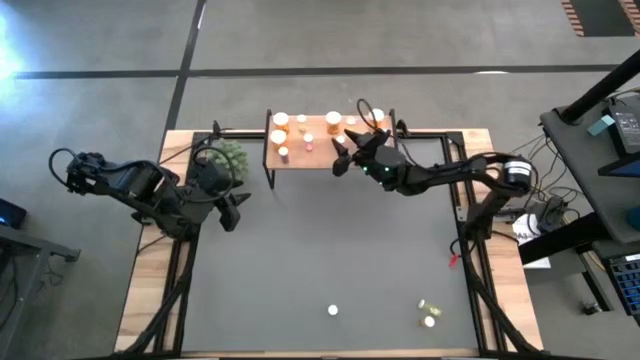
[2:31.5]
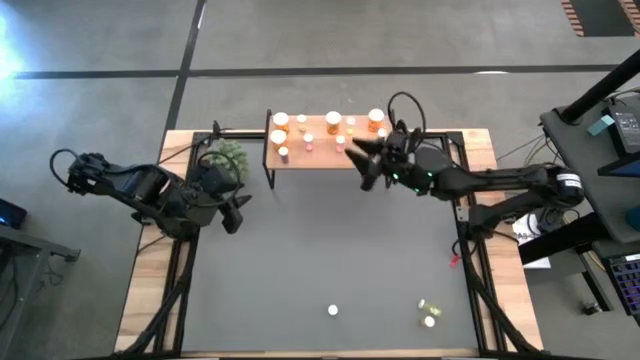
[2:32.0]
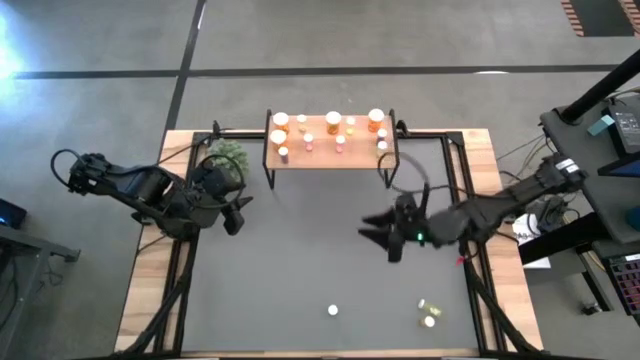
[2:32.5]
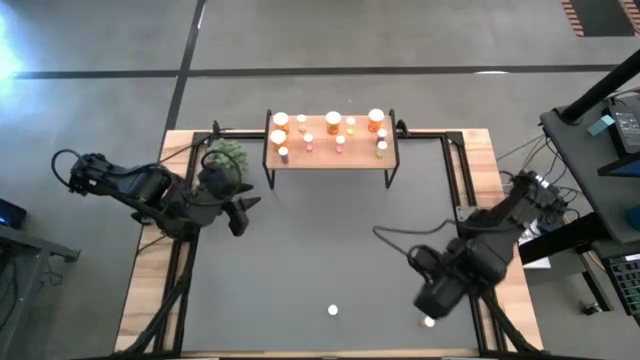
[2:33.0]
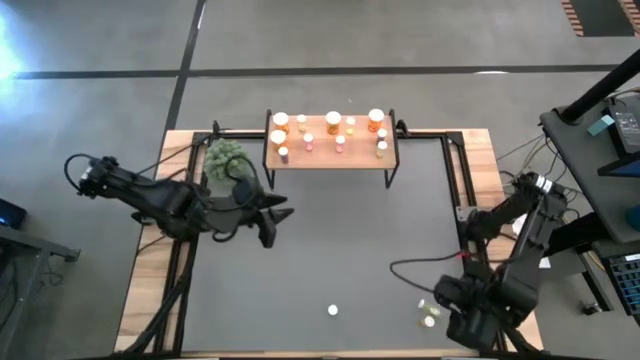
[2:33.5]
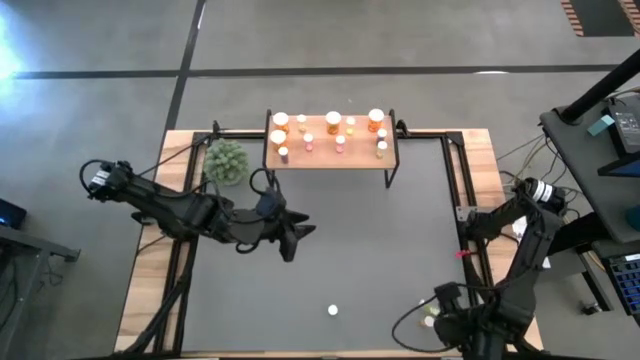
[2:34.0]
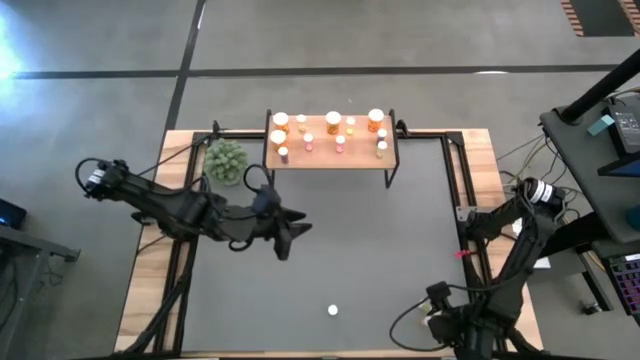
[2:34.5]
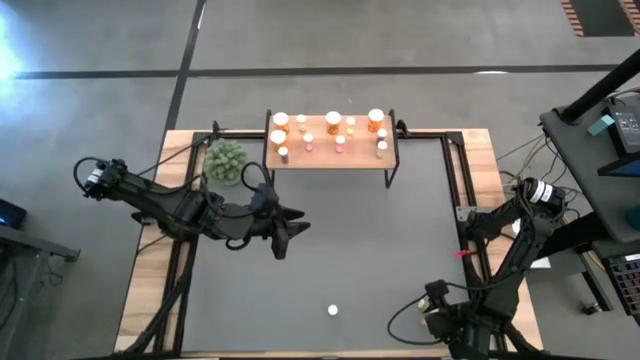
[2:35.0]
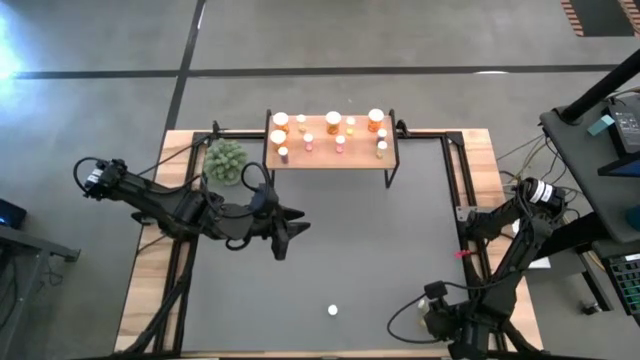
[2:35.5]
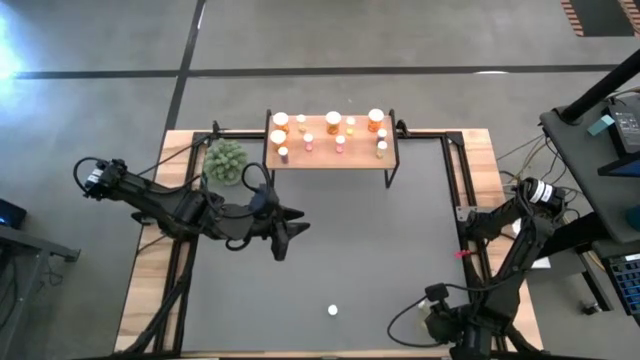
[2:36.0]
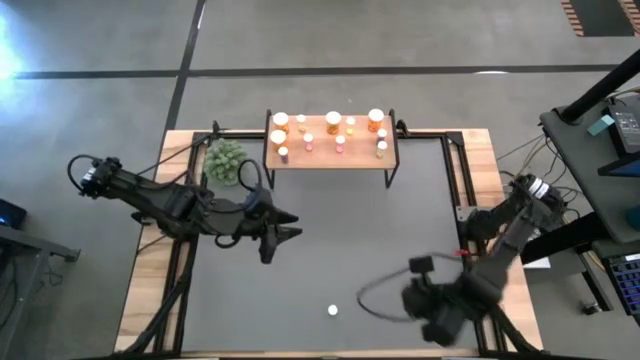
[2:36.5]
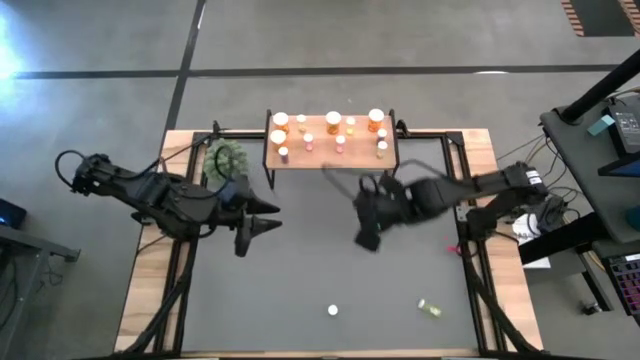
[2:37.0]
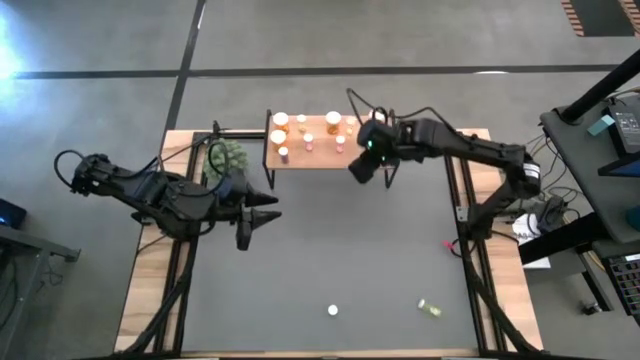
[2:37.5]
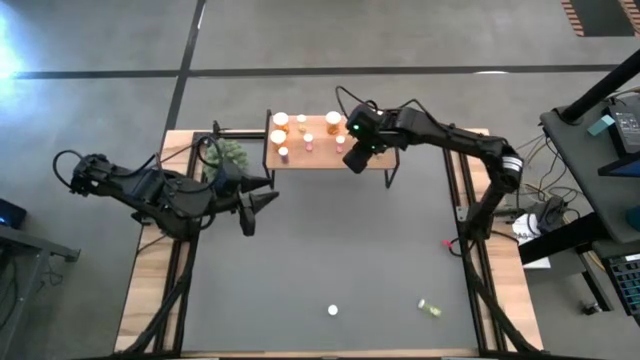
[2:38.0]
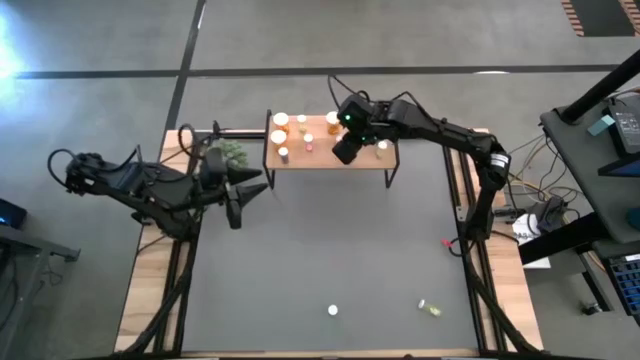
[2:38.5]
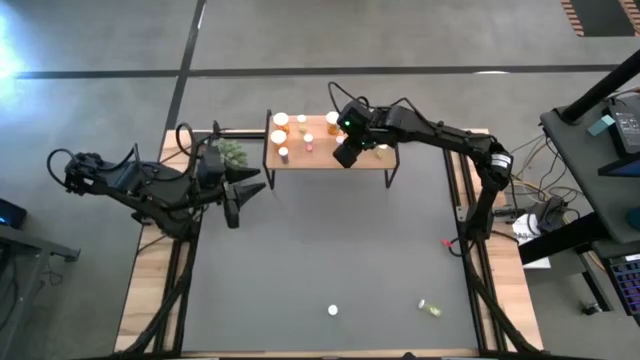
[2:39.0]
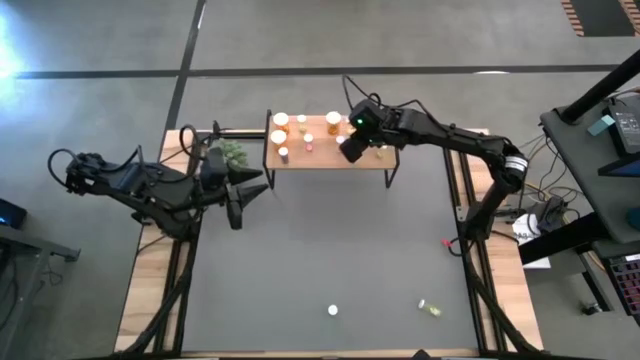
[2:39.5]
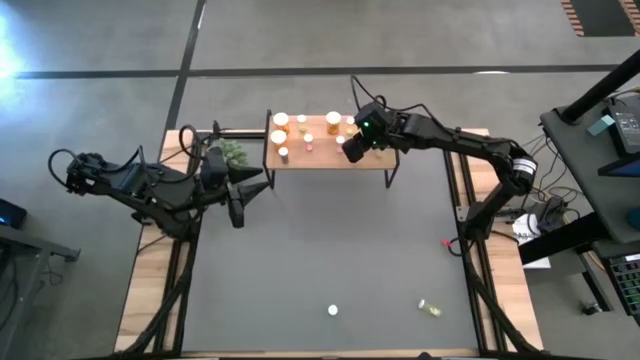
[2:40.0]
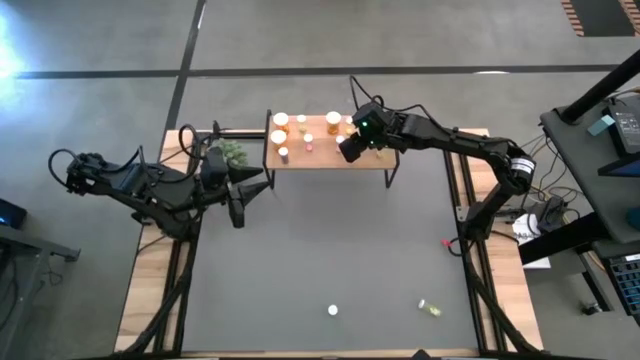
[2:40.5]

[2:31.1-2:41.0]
Task: Pick and place medicine bottles onto shelf by color
Put the small orange pill bottle on the shelf

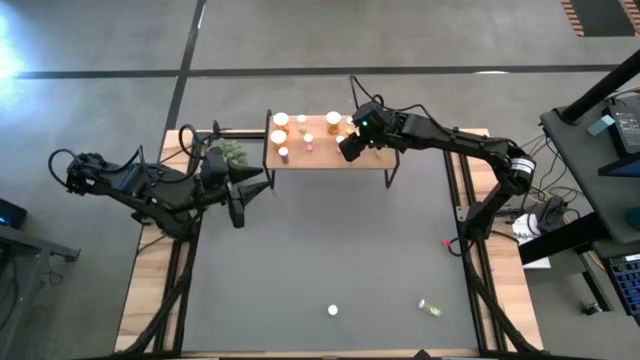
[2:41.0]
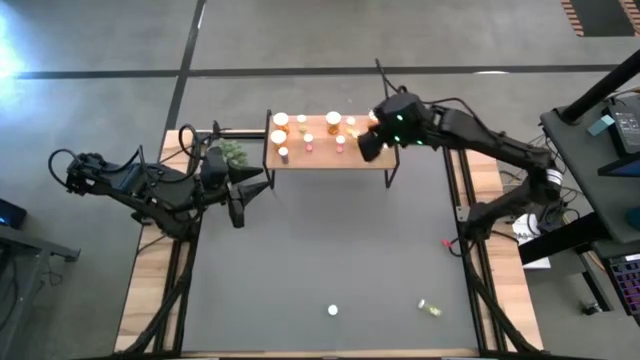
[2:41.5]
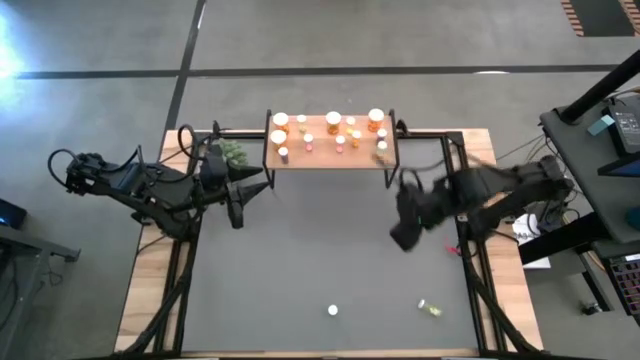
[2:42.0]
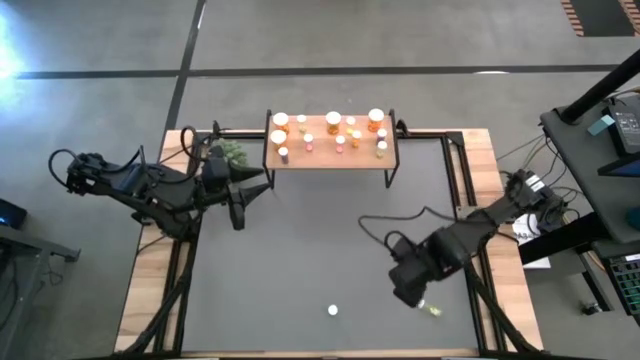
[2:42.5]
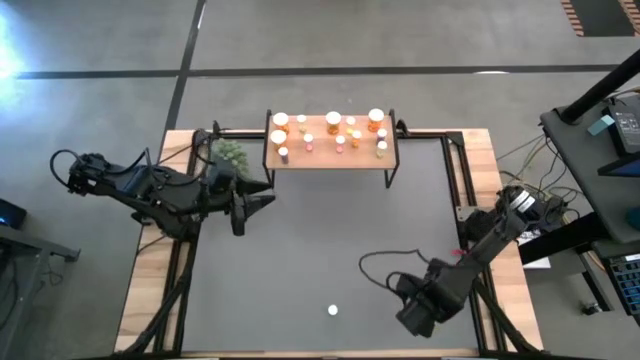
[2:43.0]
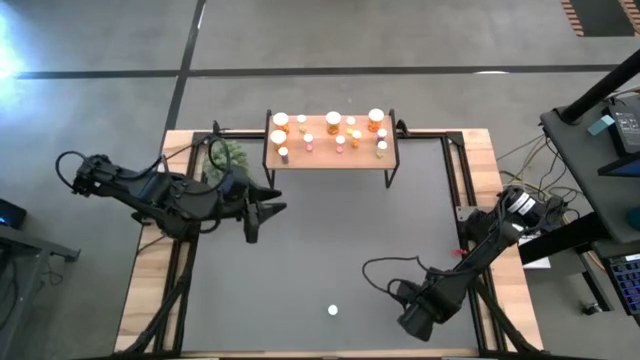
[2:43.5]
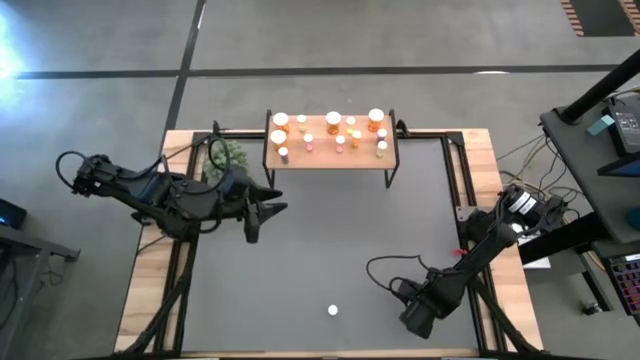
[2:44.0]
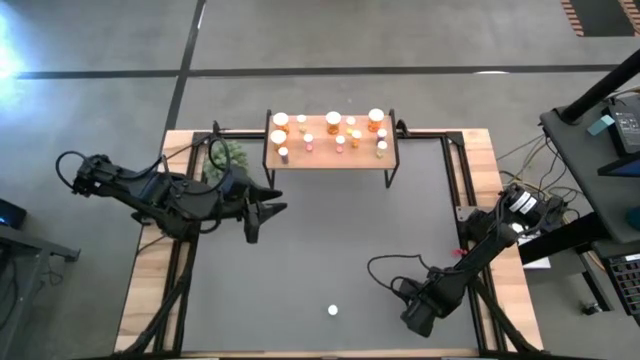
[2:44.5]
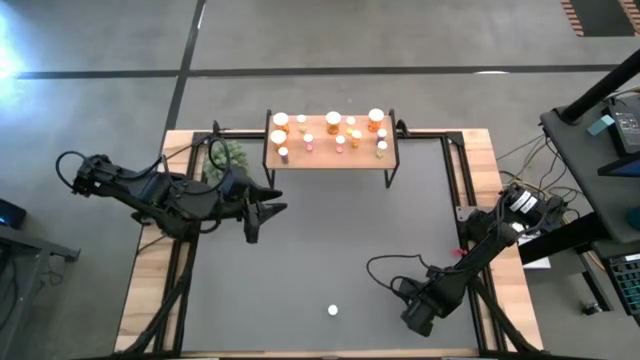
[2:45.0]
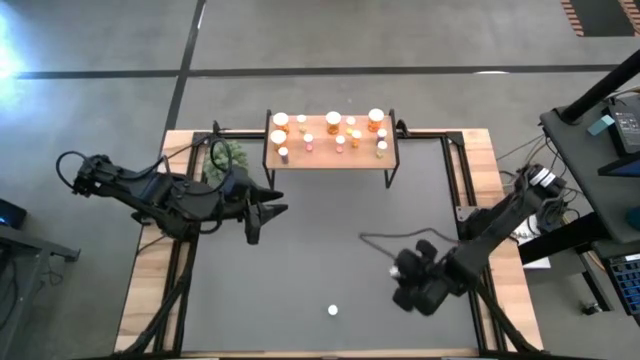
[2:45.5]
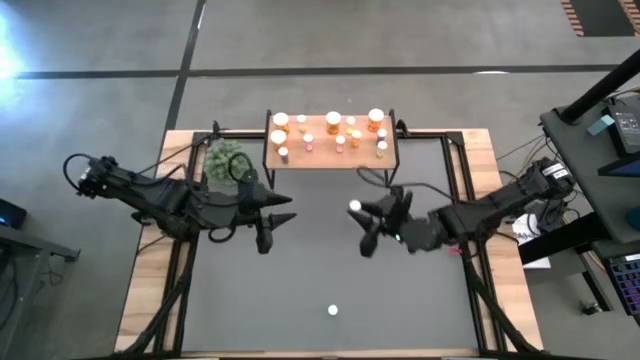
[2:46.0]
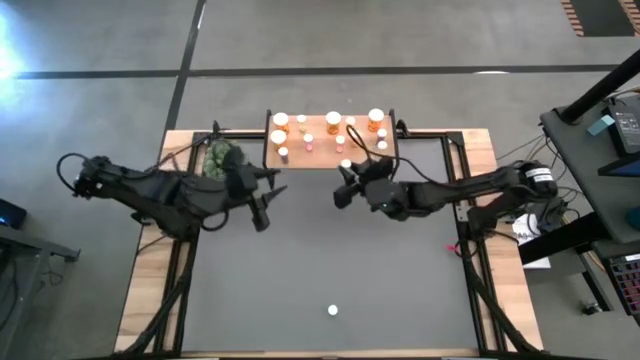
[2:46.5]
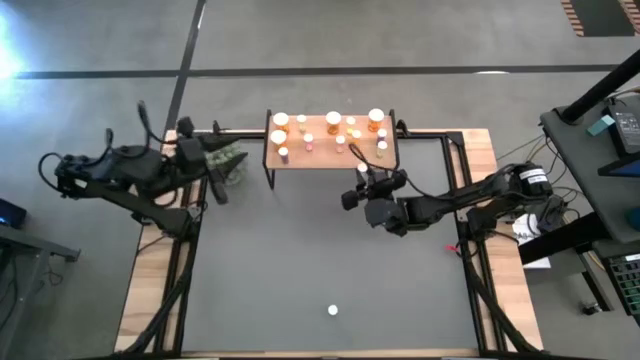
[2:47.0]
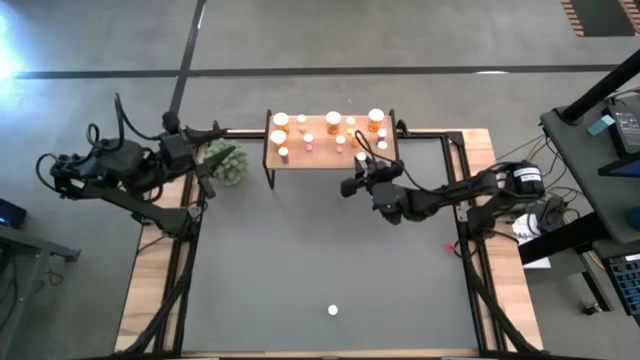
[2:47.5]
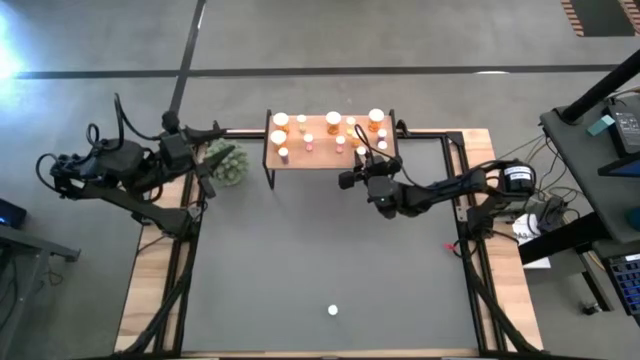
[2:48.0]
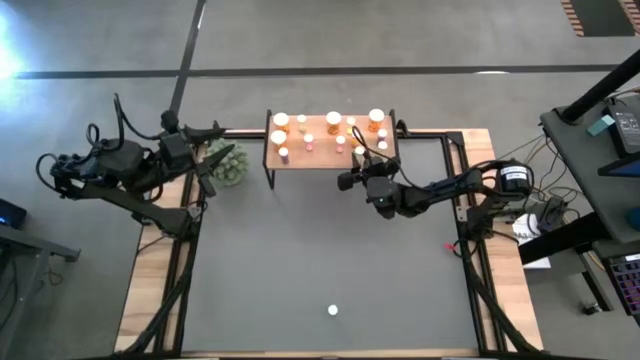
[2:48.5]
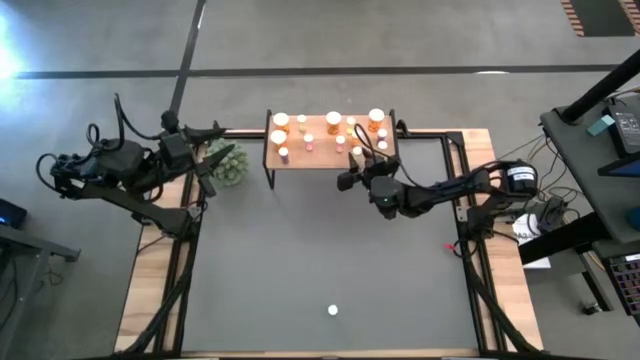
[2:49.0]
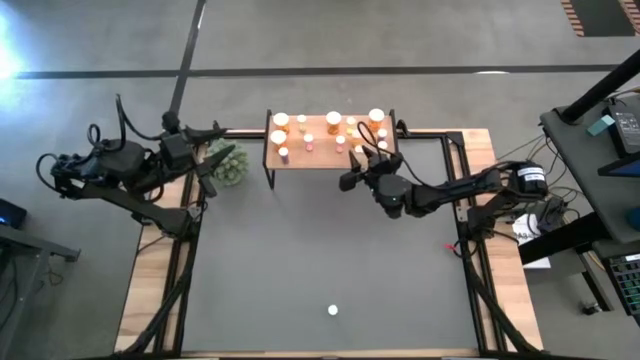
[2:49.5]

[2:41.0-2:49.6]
Put the small yellow pill bottle on the shelf

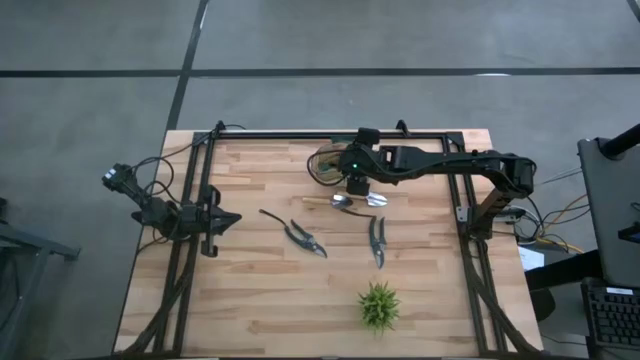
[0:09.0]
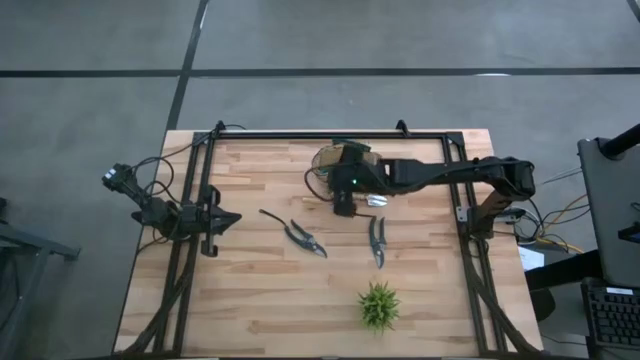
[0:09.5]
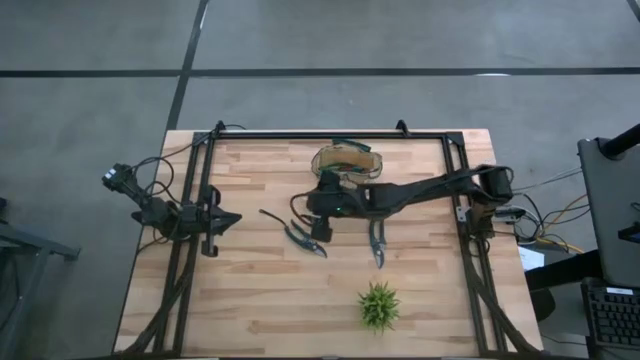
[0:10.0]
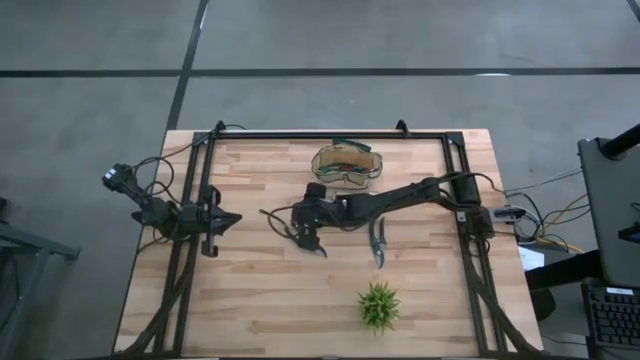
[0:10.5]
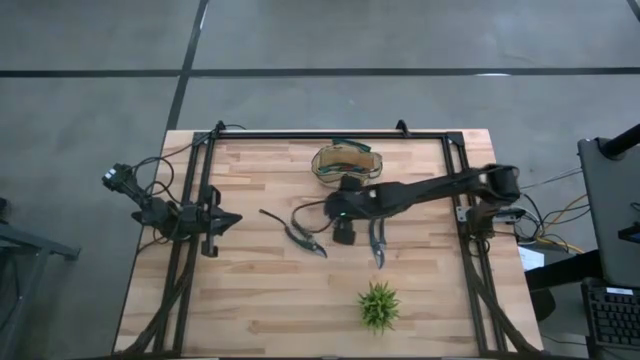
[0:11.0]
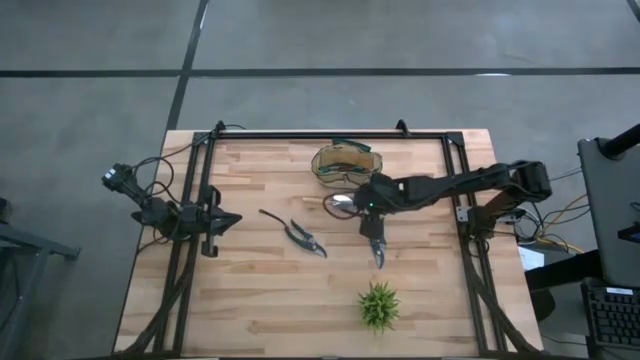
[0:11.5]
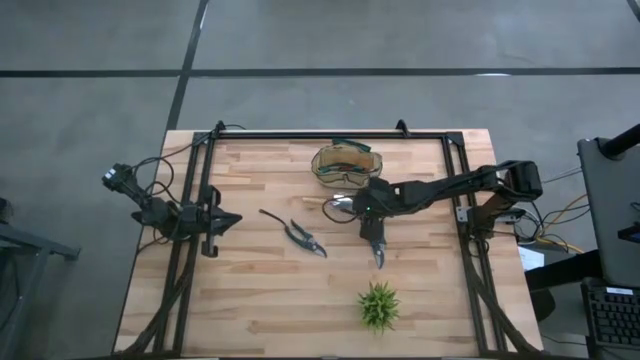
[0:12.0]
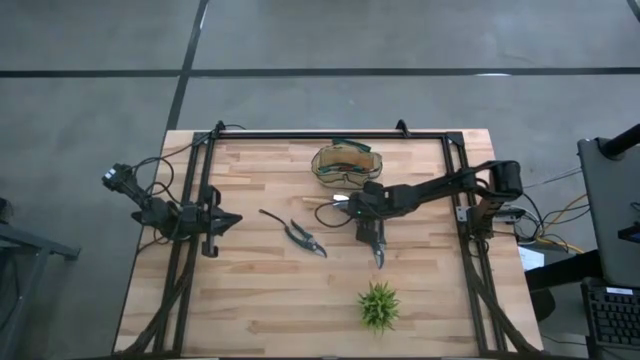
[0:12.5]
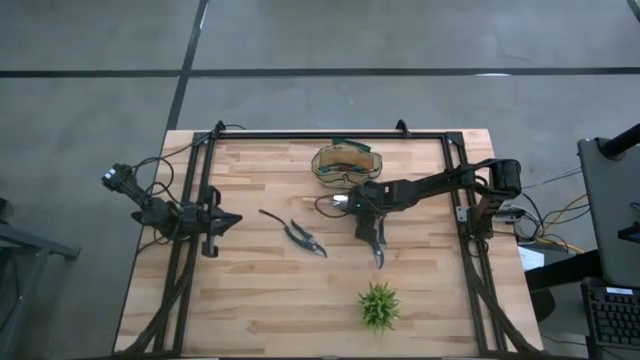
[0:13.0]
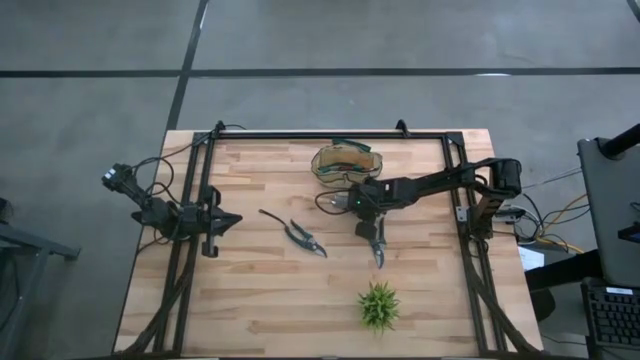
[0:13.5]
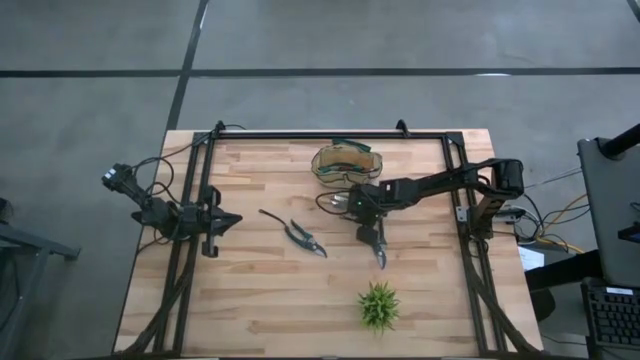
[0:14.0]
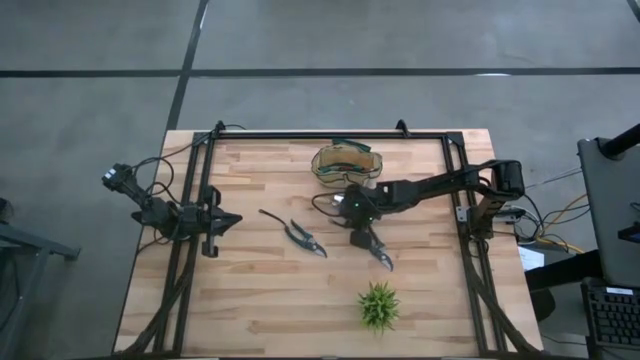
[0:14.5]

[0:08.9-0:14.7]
Task: Pick & Place Garden tools in Gardening bag
Put the green shear scissors into the gardening bag
